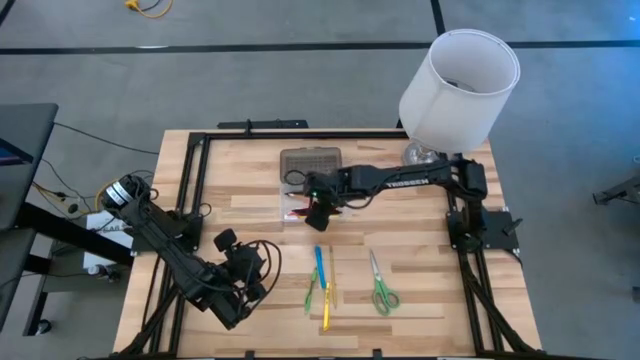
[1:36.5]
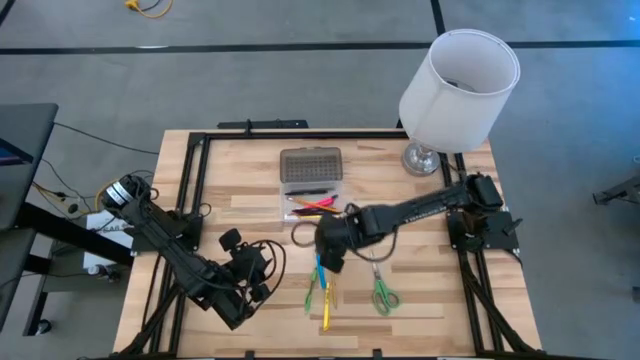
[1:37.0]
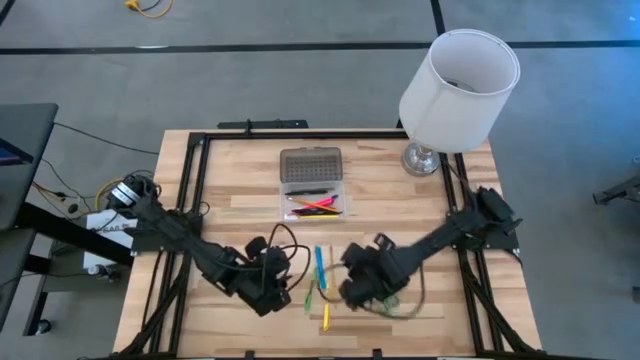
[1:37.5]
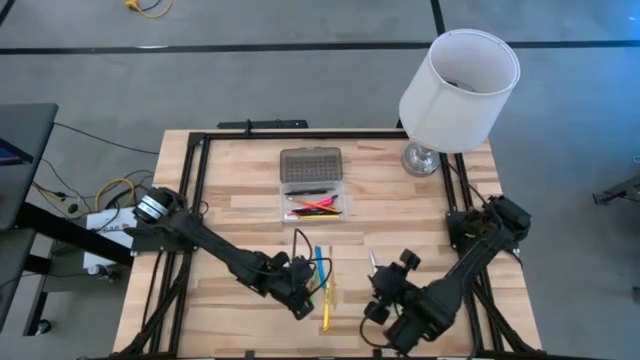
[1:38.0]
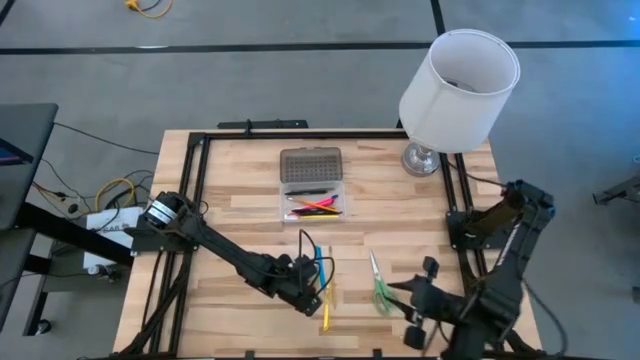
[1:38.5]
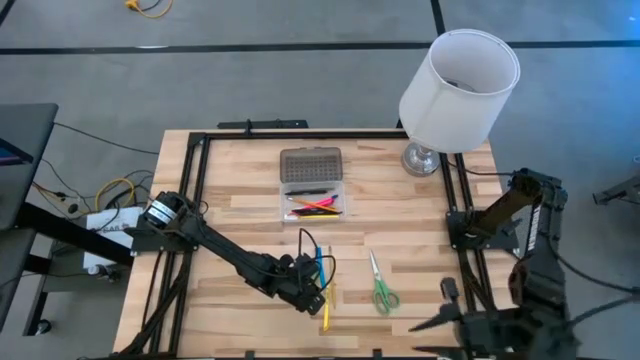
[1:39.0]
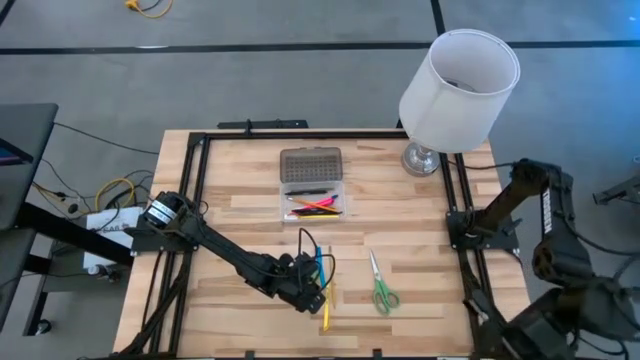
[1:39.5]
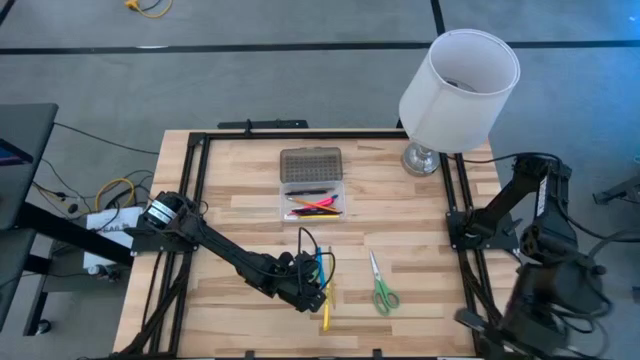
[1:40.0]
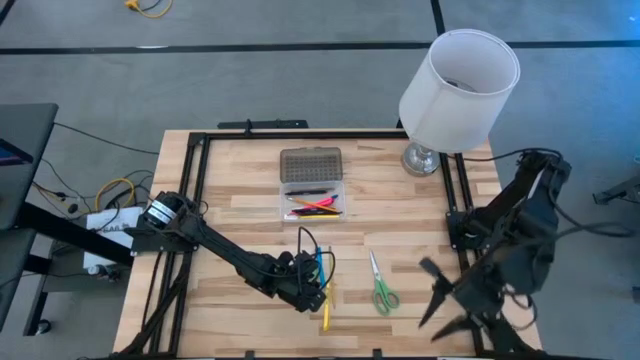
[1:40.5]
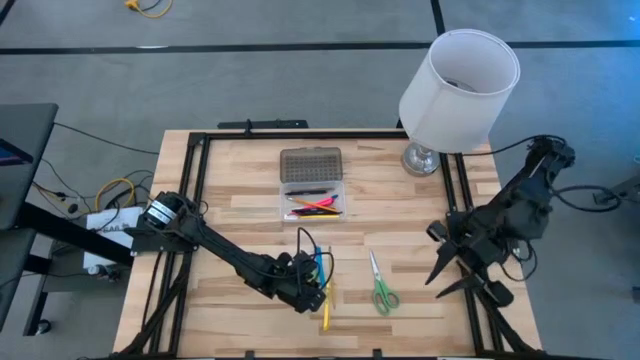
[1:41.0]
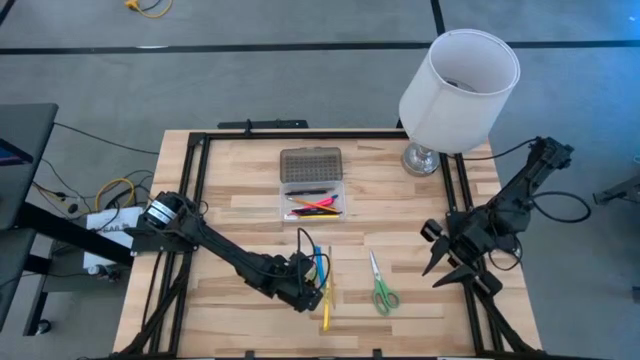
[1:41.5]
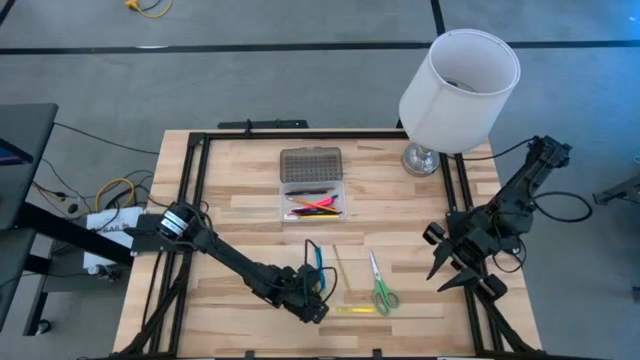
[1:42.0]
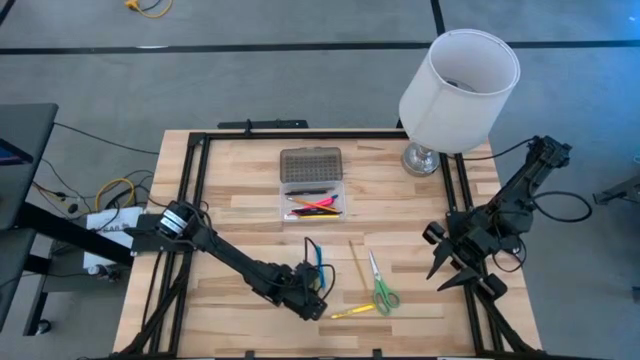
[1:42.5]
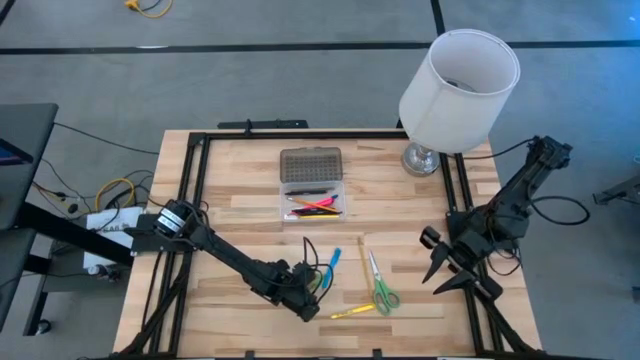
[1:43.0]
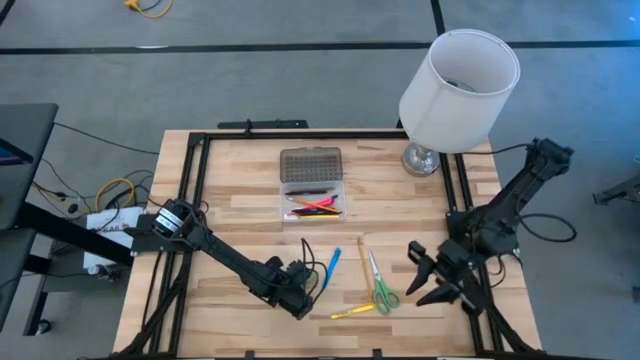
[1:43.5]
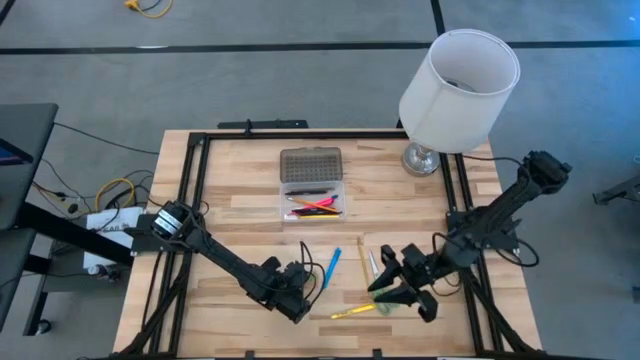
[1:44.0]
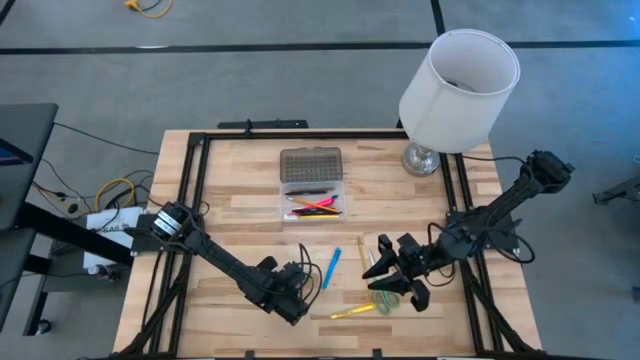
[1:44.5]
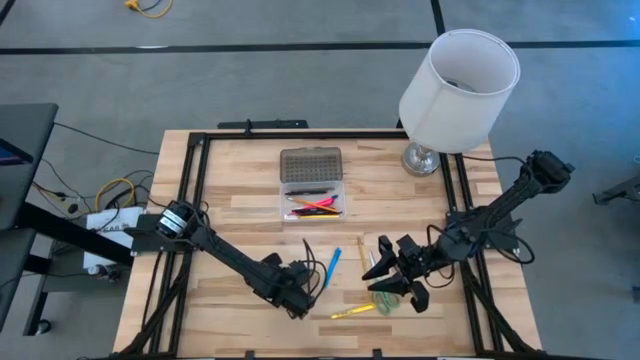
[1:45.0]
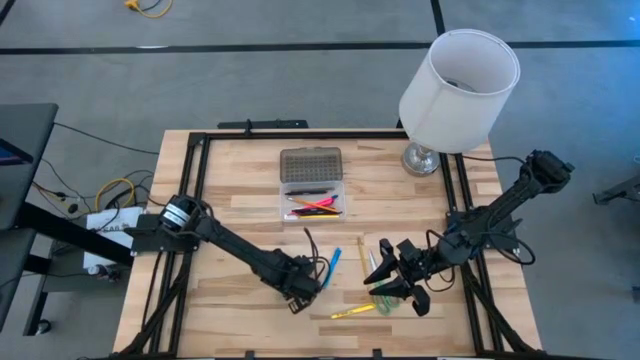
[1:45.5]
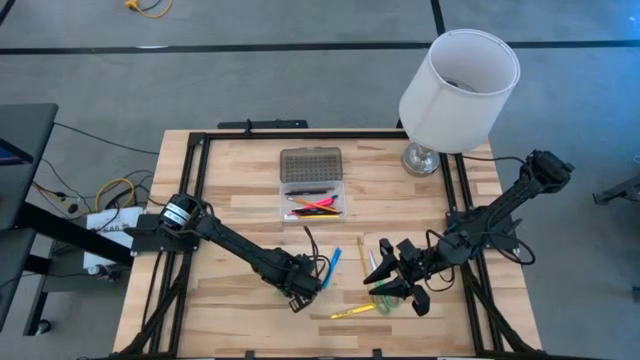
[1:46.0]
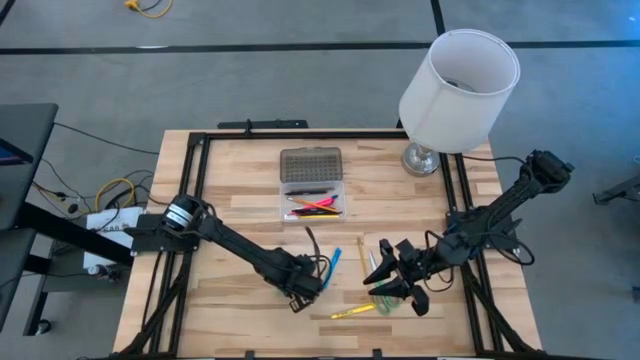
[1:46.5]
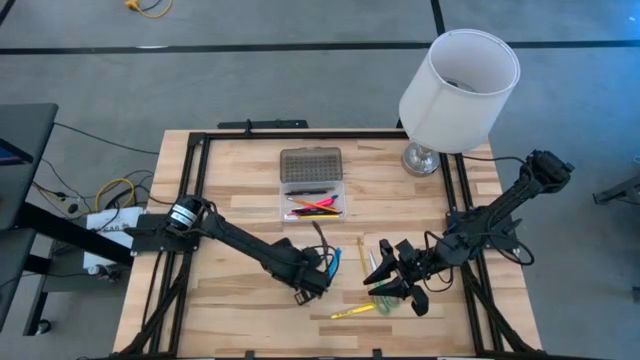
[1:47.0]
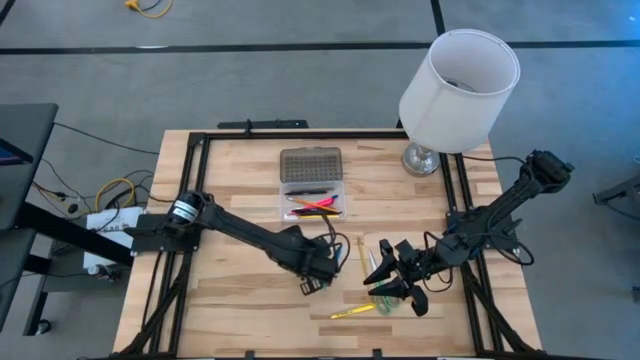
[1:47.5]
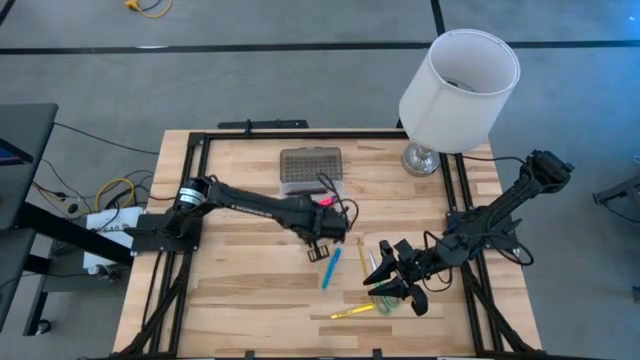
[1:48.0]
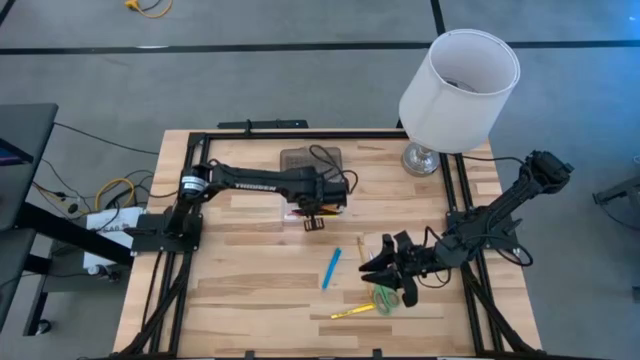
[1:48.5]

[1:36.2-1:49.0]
Task: Pick & place school supplies into a supply box
Put the green transparent pen into the supply box

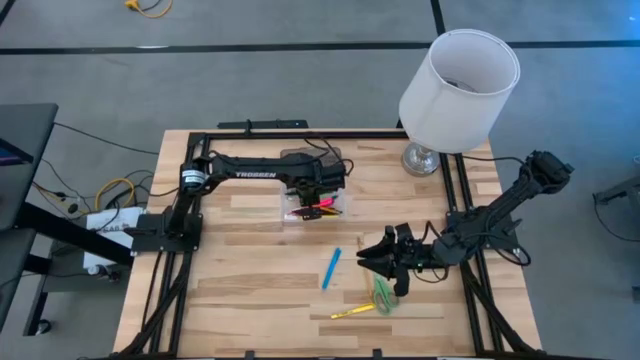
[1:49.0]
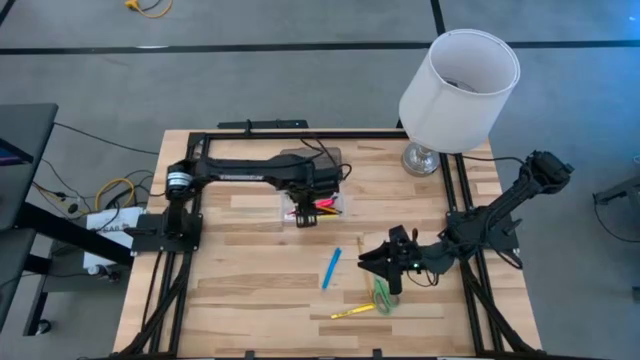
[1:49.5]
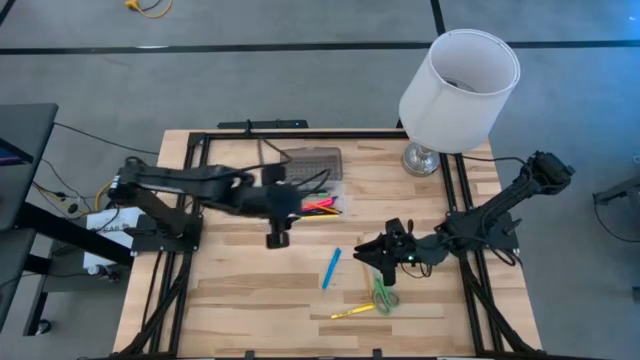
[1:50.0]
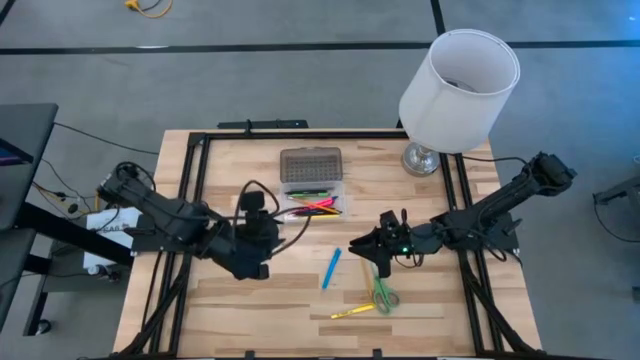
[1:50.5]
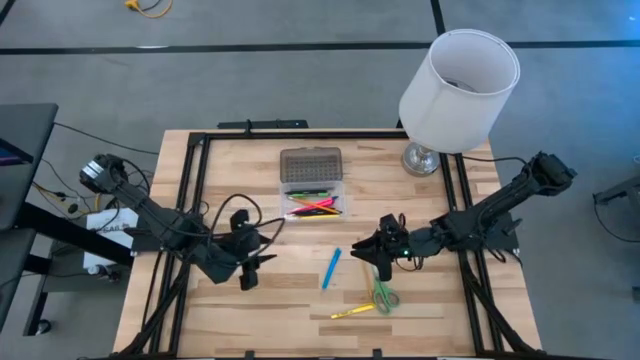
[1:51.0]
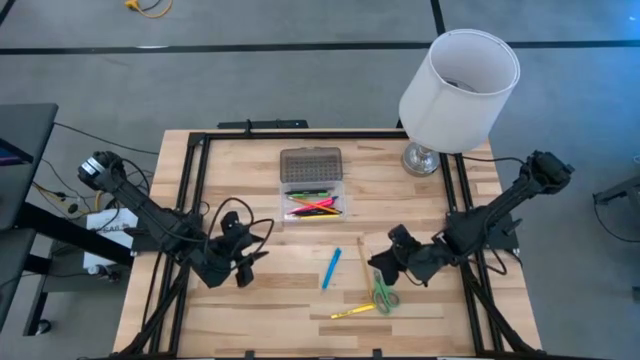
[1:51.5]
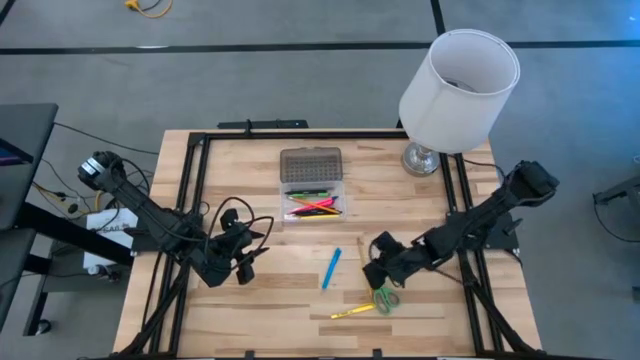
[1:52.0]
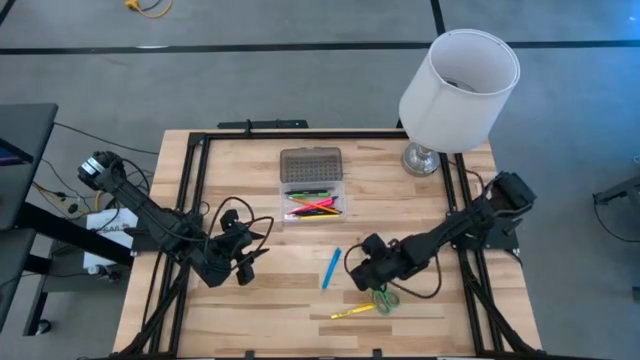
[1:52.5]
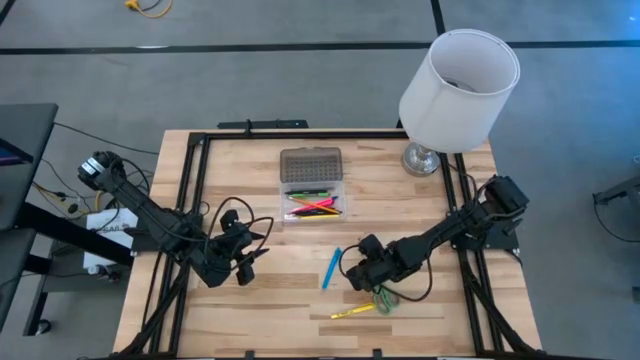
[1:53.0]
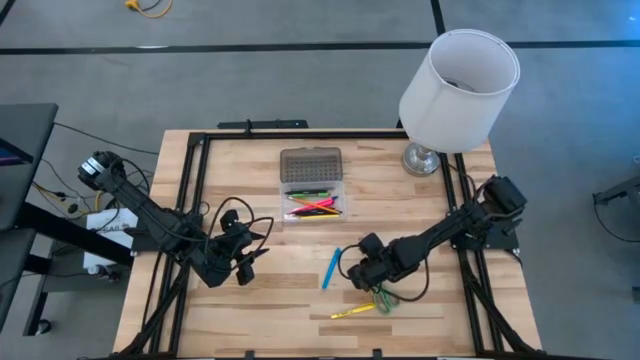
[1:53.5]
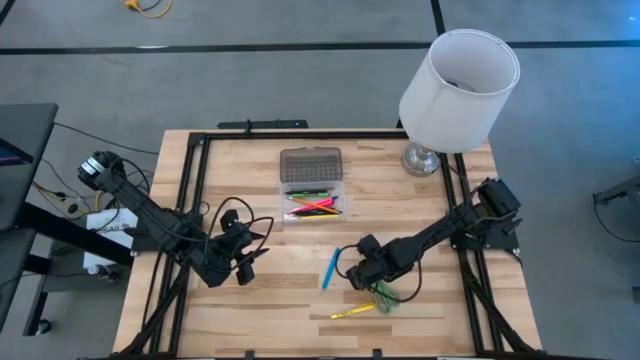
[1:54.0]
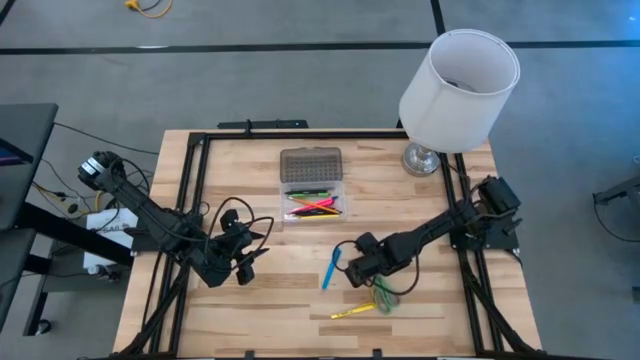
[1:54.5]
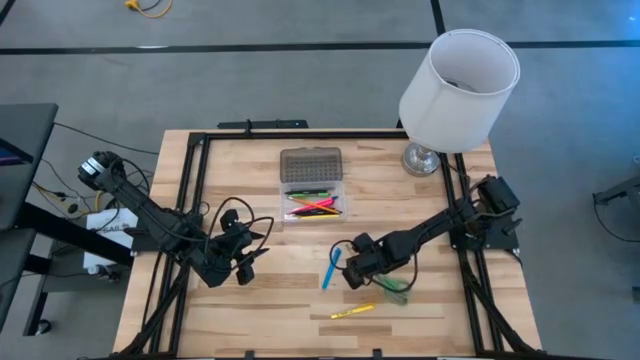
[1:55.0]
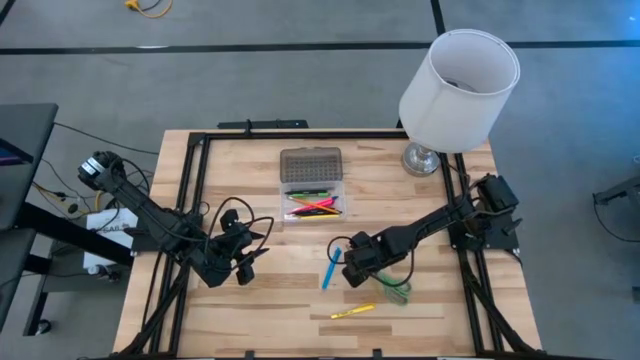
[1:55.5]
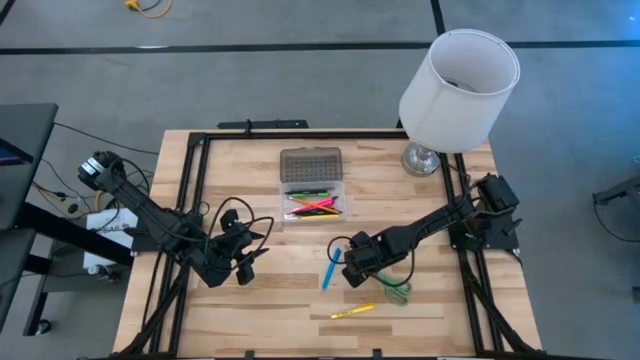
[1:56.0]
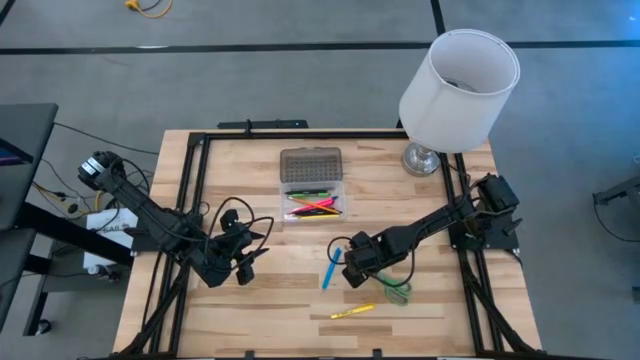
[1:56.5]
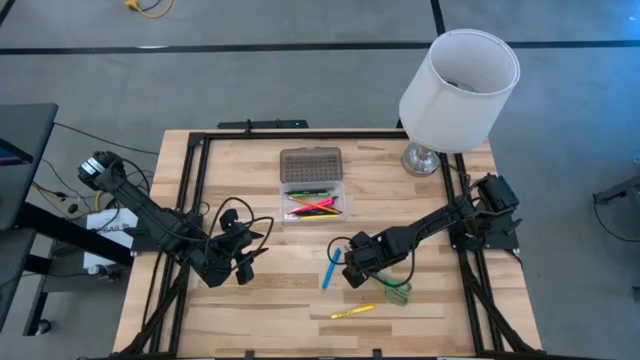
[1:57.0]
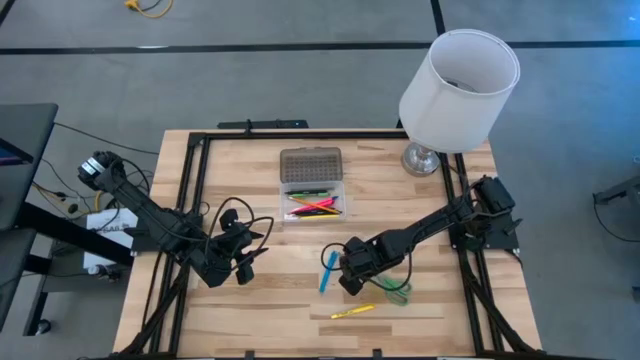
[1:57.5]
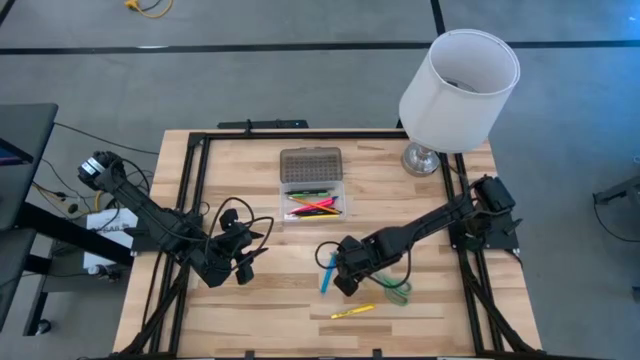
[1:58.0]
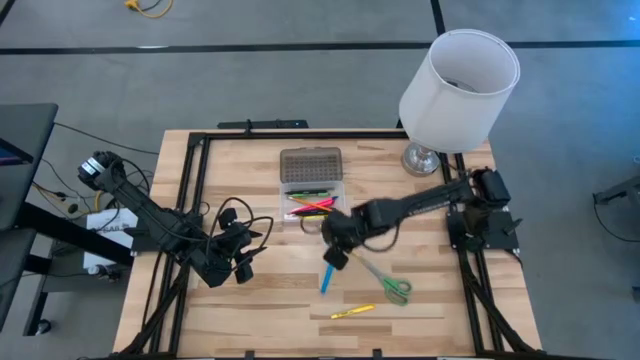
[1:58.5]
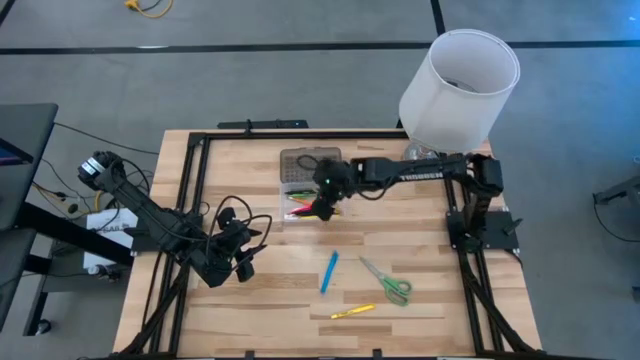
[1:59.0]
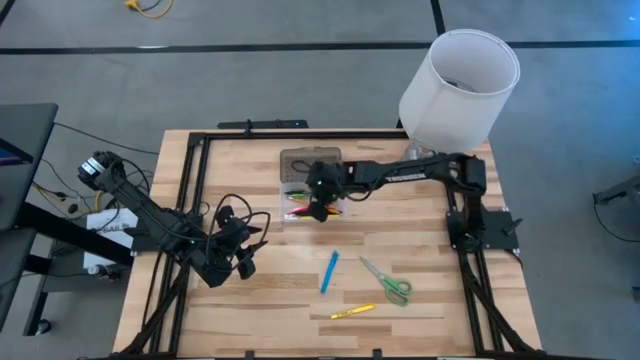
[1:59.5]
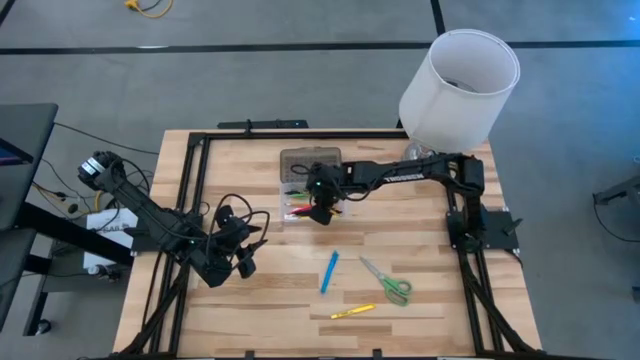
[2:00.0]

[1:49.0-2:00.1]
Put the yellow pencil into the supply box
